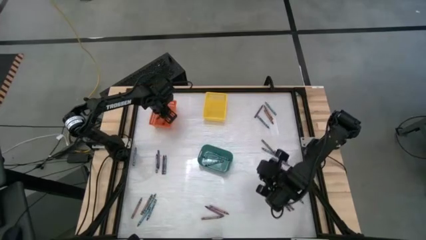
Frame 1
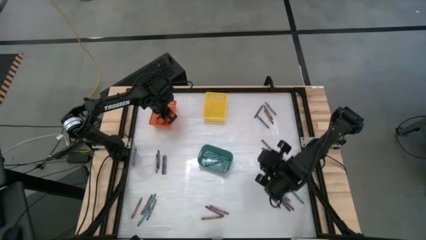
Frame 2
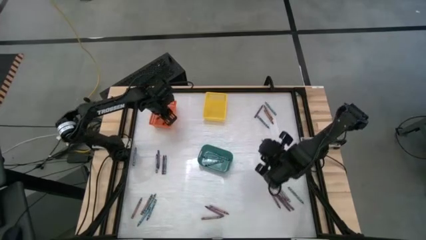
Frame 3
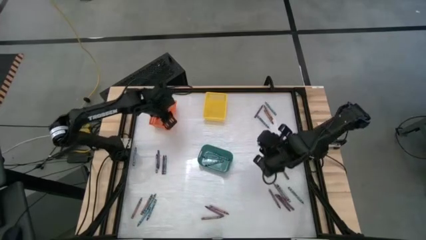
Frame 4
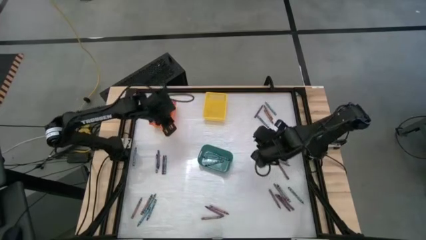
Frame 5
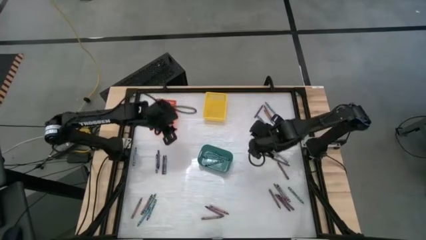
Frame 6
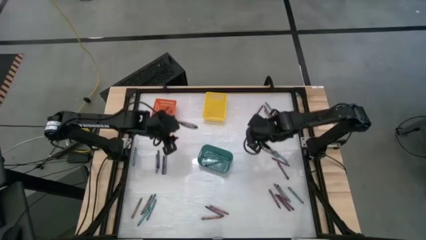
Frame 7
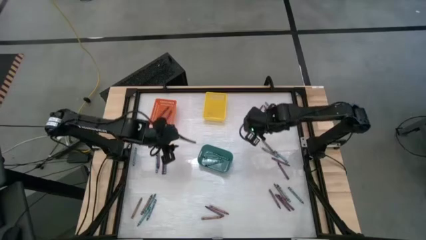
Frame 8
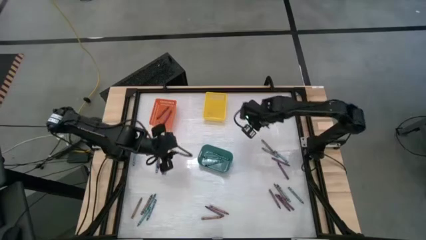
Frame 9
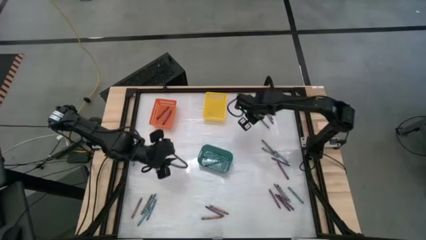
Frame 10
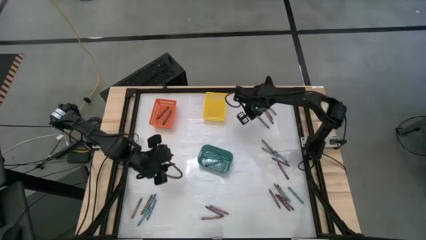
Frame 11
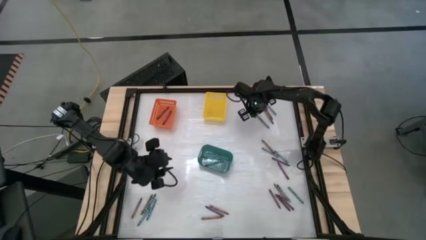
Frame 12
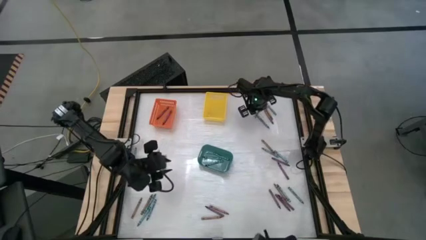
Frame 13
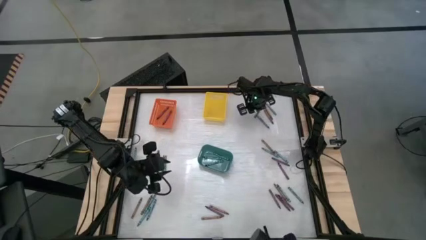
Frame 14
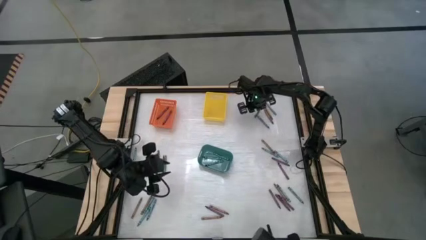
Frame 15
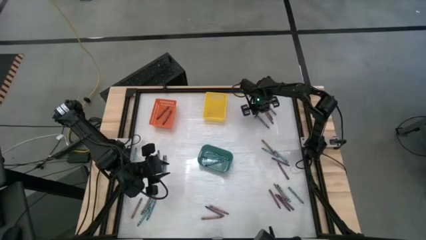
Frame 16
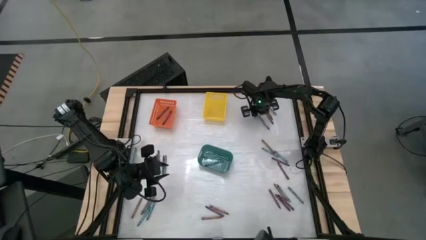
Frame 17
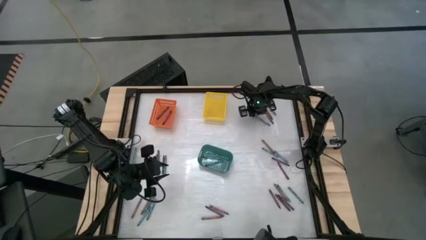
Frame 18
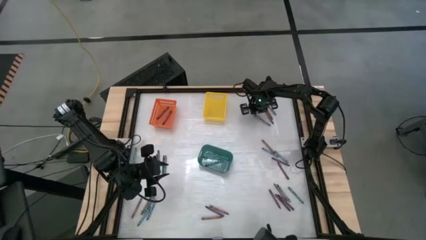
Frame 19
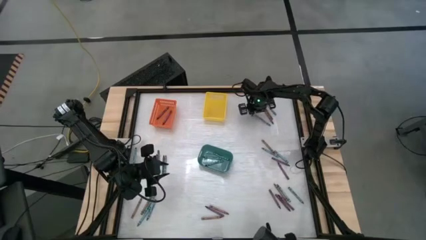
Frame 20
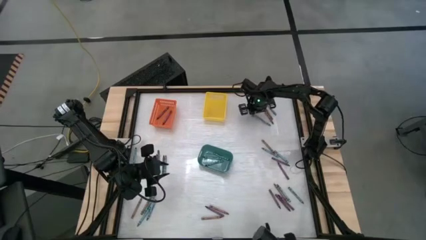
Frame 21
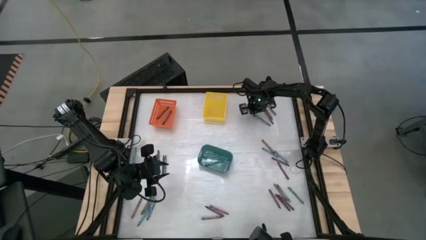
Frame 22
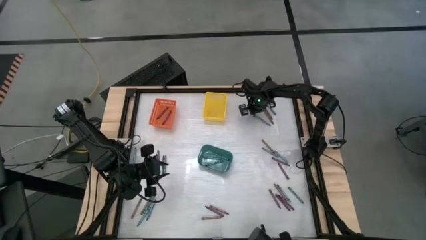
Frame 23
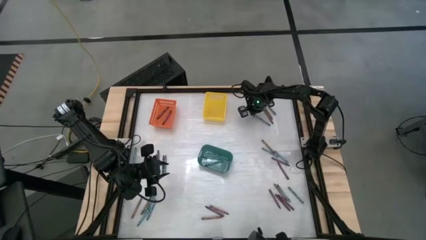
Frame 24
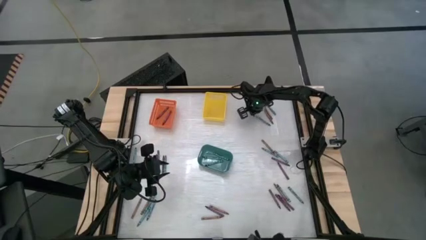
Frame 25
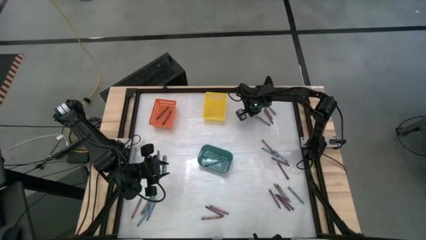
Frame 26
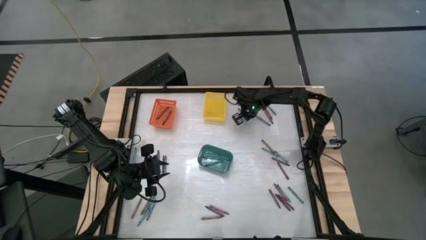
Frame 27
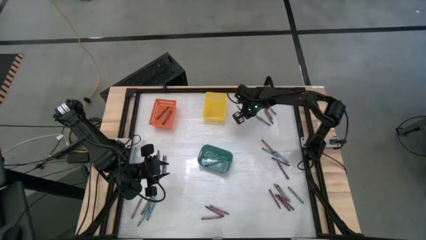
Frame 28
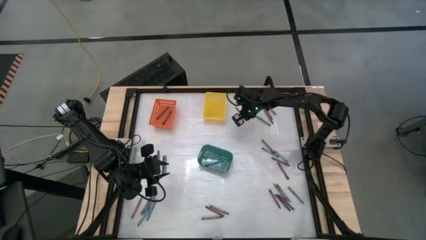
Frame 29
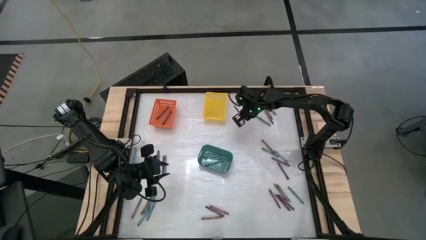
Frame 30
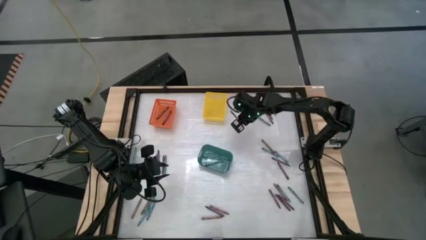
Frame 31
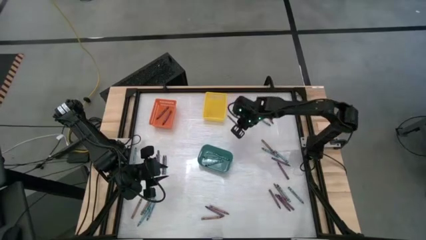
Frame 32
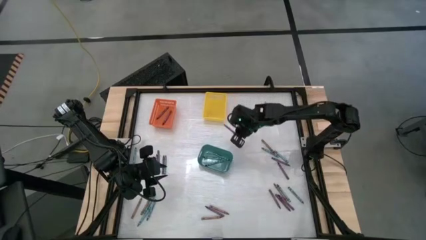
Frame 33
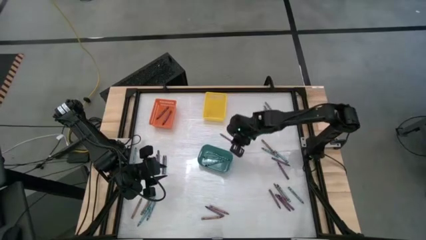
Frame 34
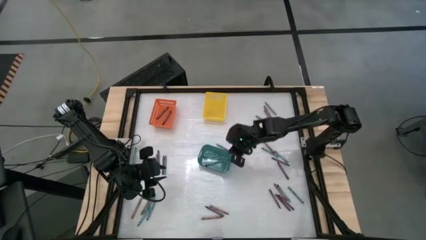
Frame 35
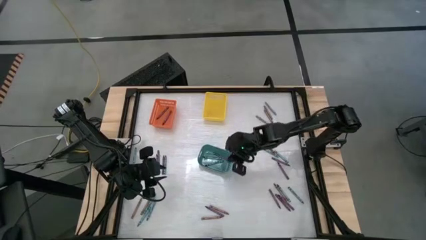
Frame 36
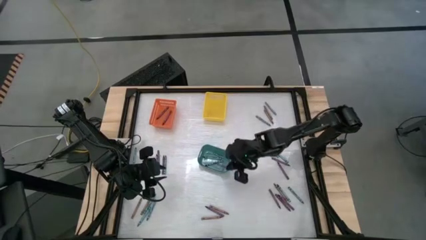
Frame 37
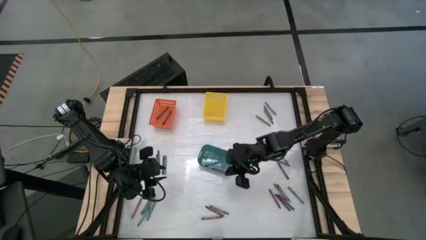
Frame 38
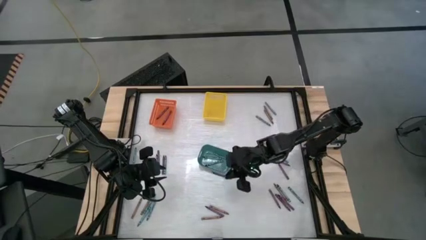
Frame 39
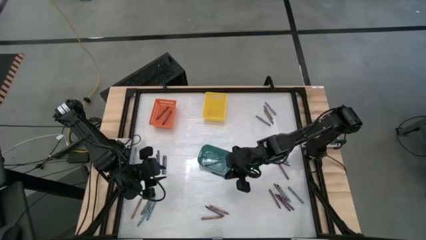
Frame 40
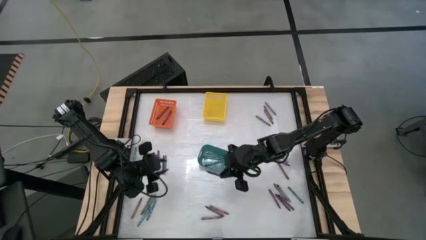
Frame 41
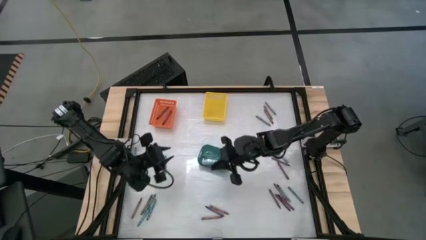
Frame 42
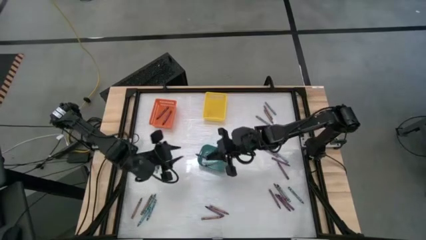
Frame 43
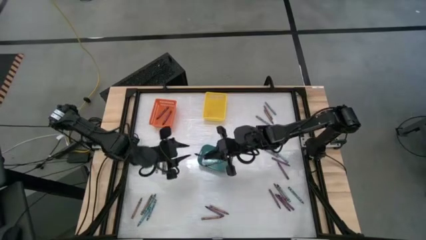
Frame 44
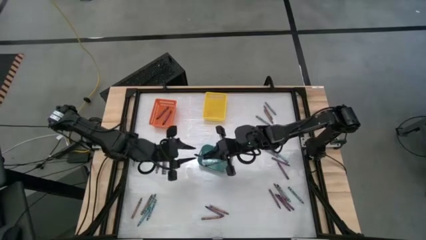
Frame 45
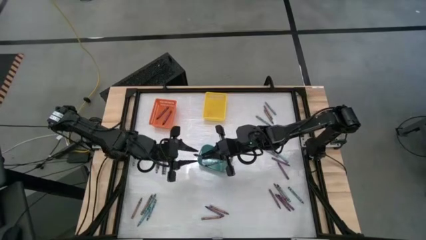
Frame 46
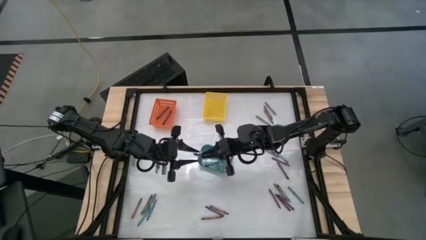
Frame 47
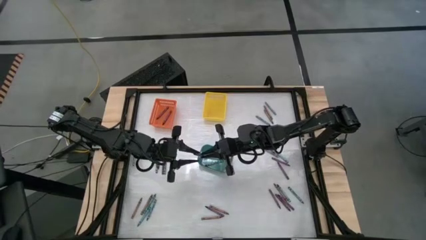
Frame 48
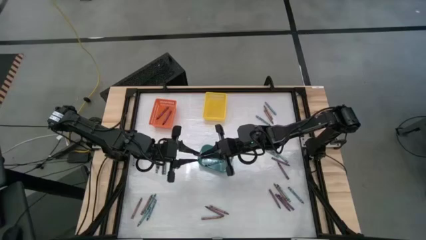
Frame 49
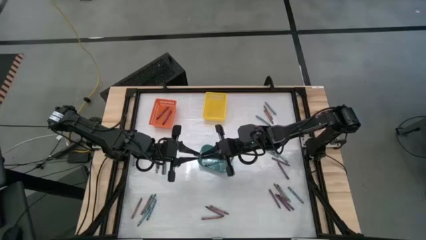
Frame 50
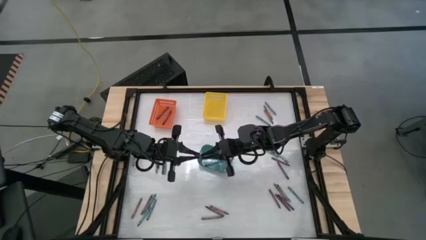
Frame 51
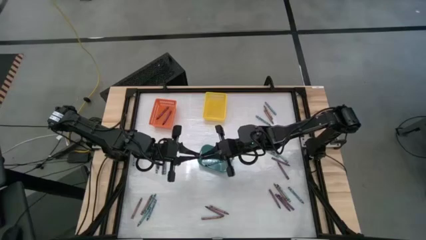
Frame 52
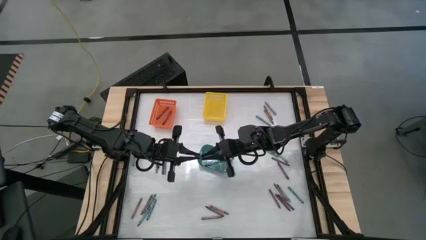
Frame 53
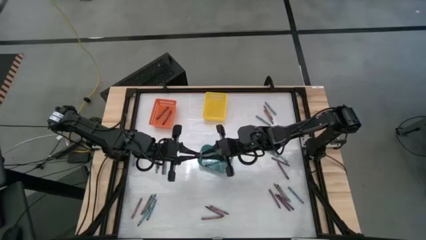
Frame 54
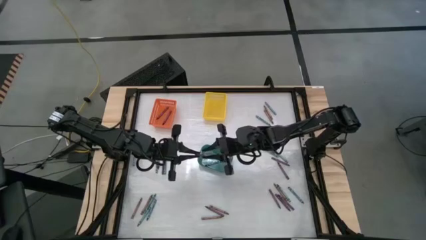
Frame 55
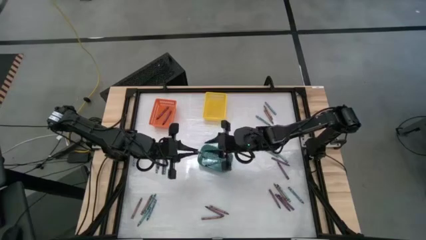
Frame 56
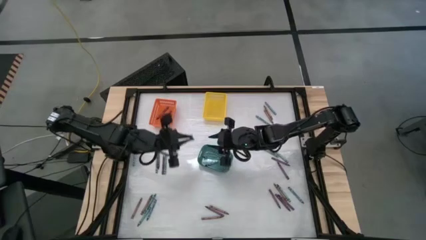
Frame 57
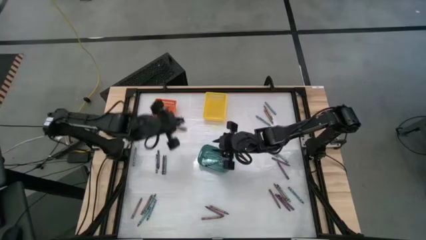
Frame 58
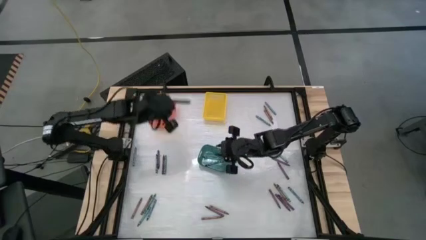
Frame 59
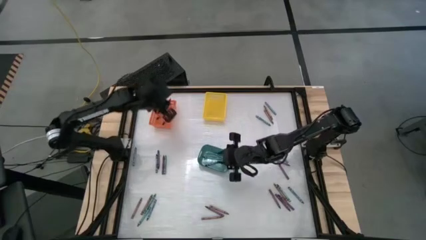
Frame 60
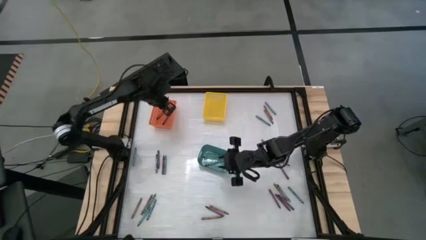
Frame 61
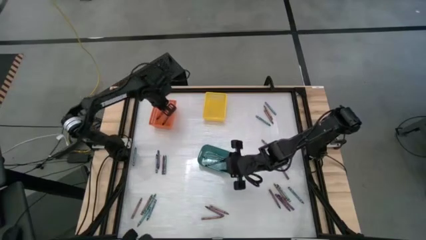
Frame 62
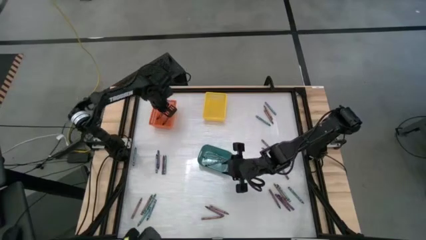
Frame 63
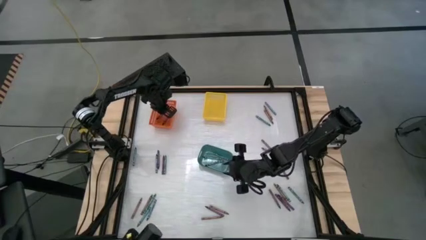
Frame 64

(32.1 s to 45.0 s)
Task: Sort crayons
Put the violet crayon into the orange bin
